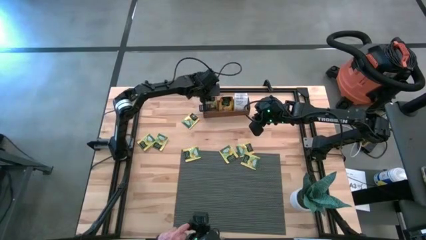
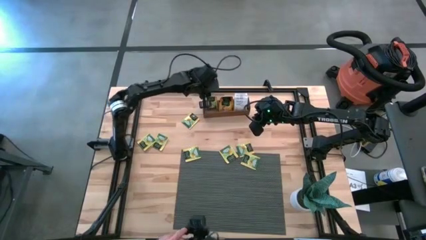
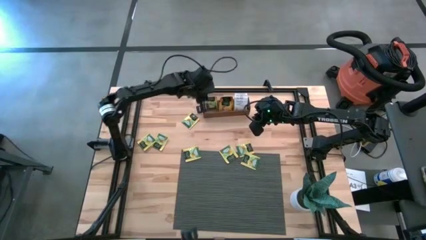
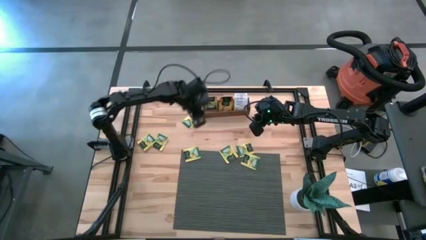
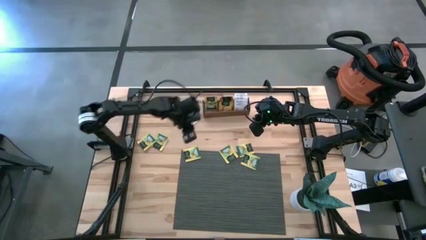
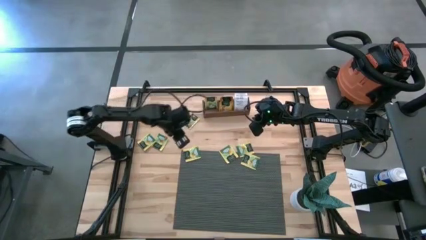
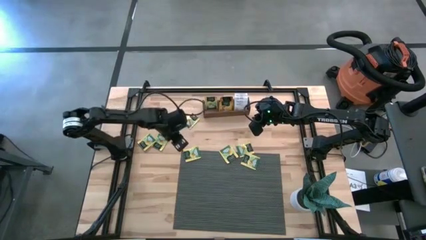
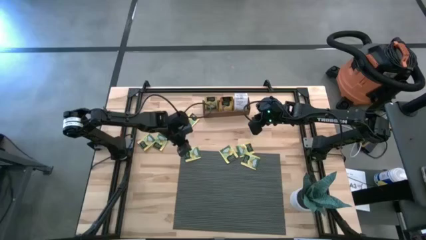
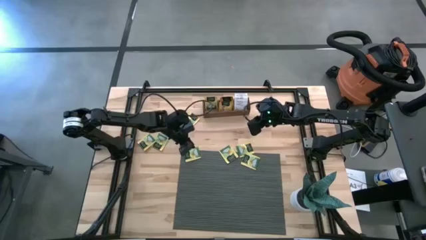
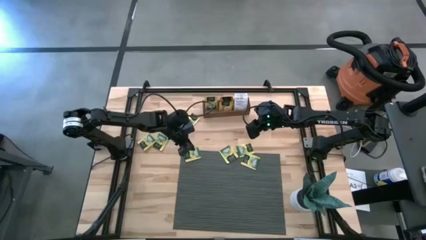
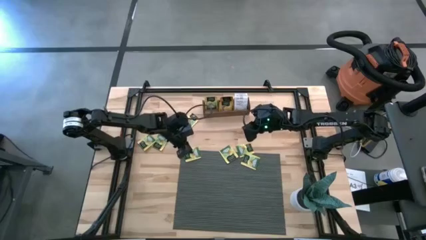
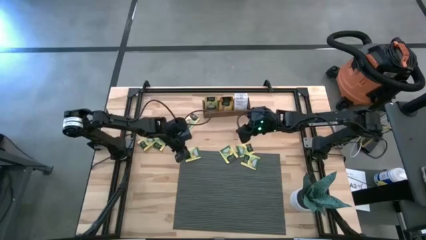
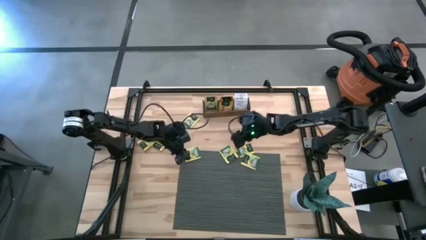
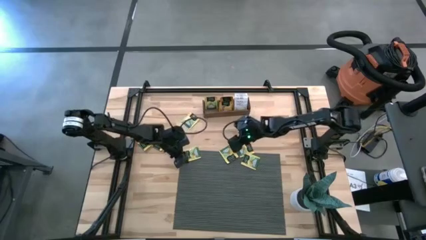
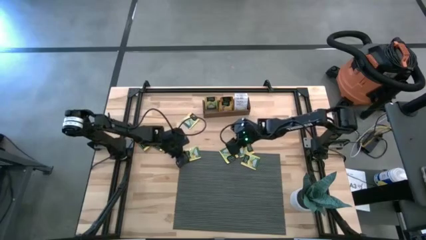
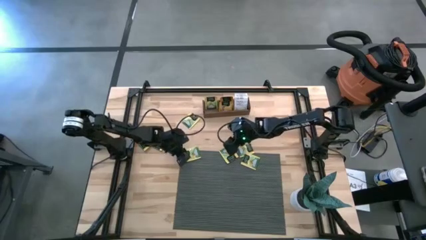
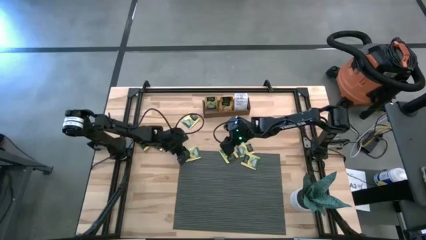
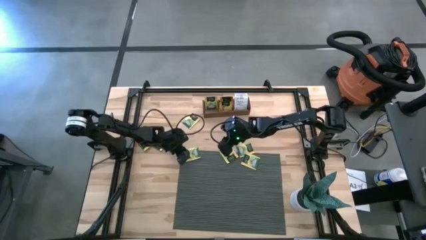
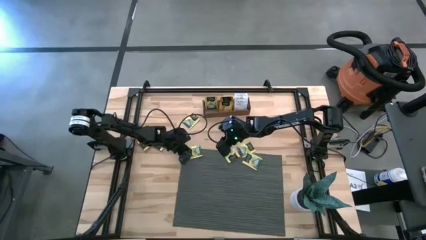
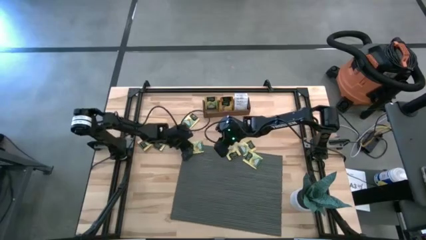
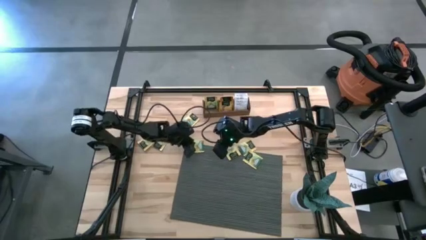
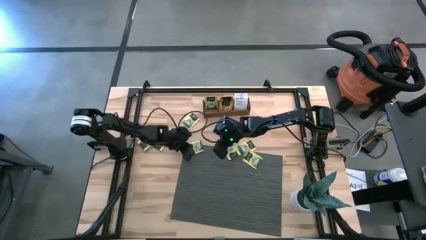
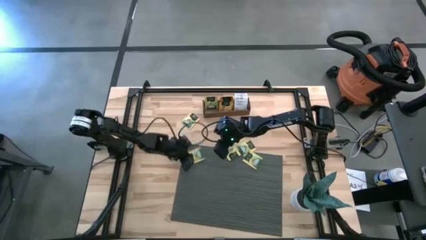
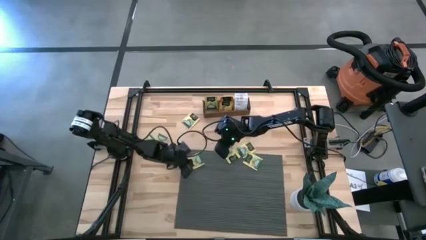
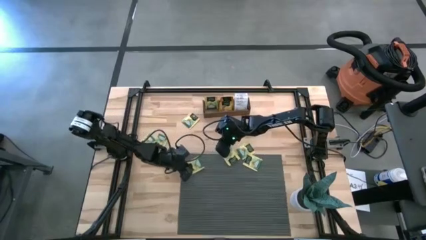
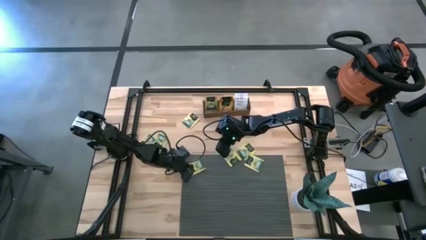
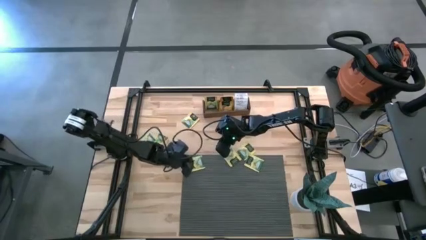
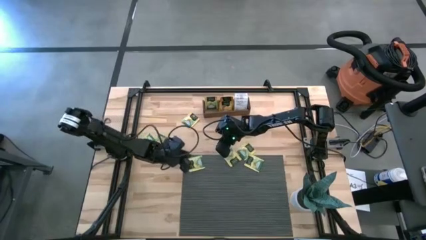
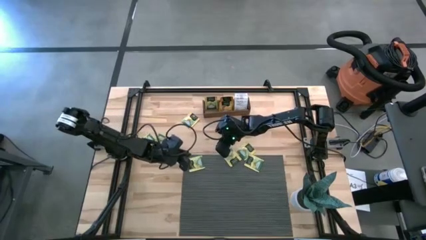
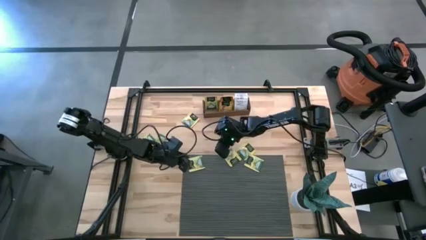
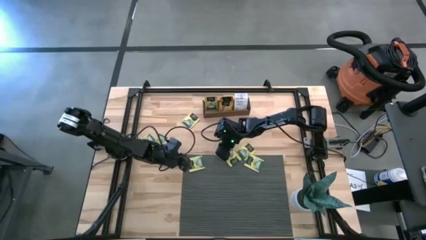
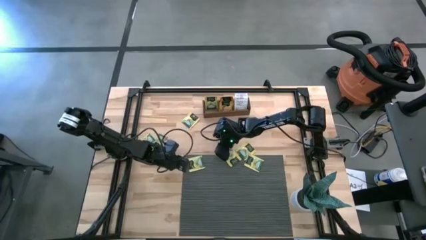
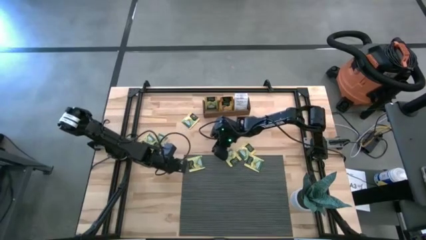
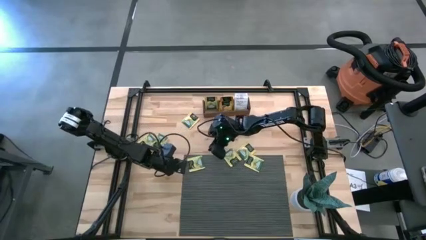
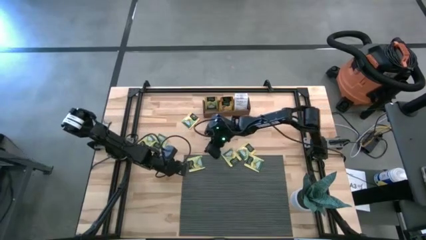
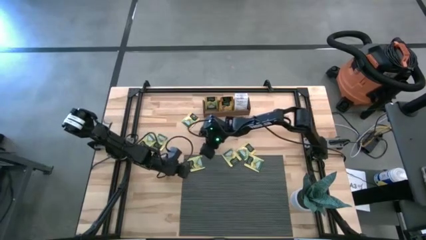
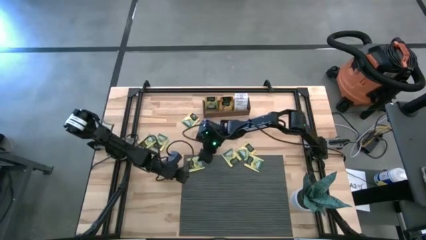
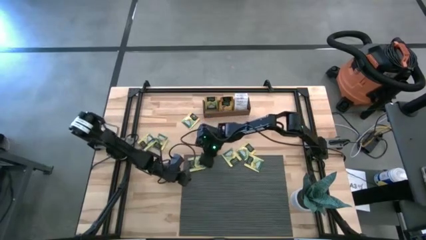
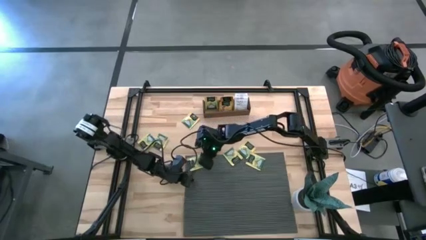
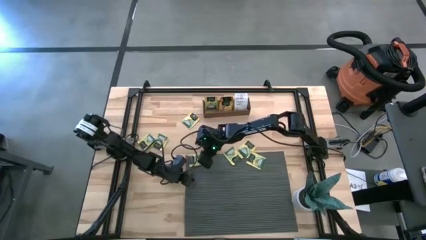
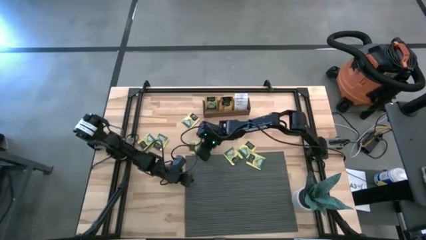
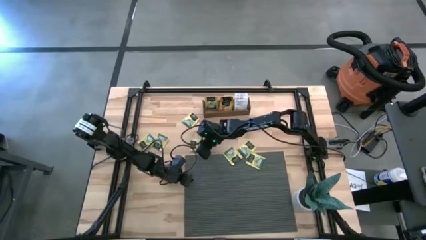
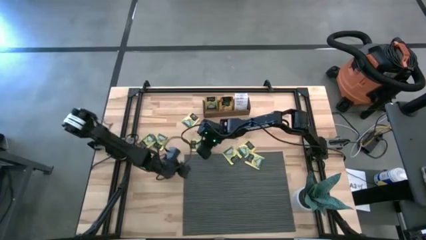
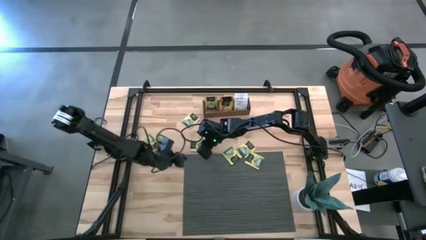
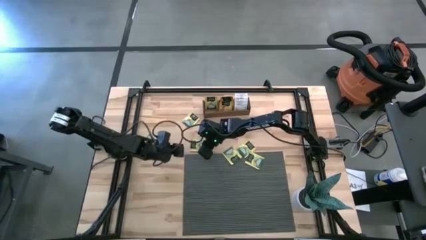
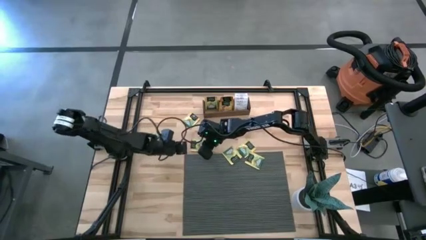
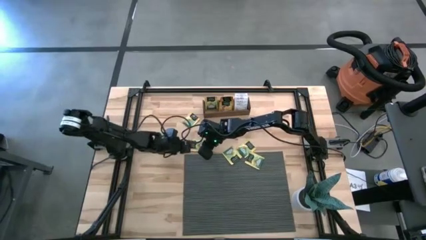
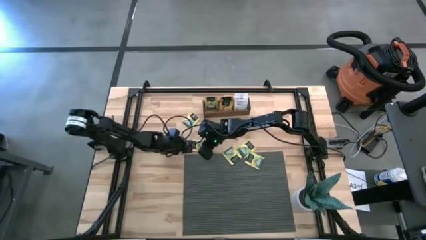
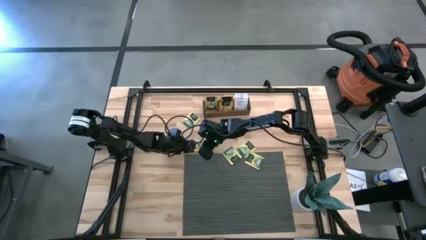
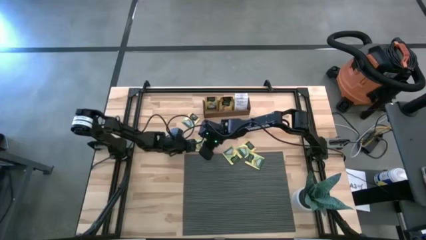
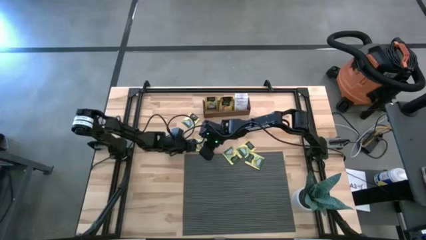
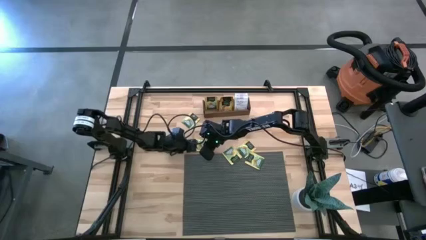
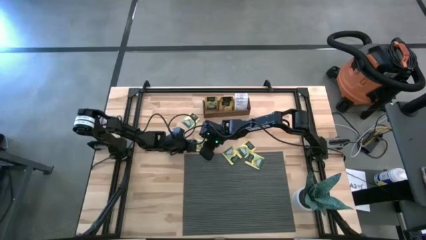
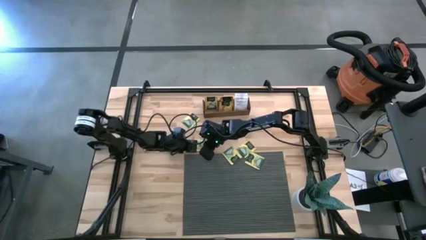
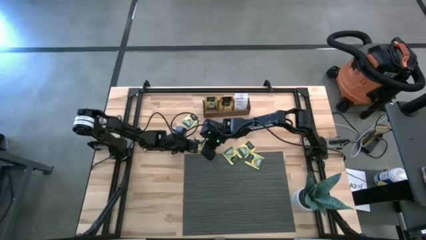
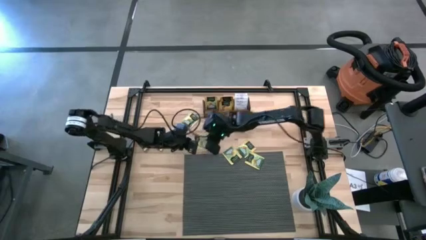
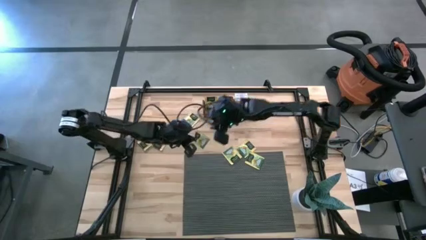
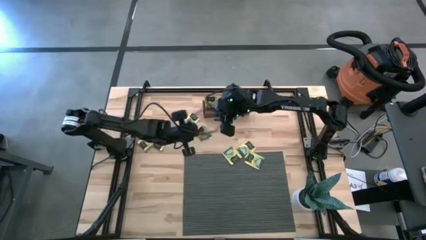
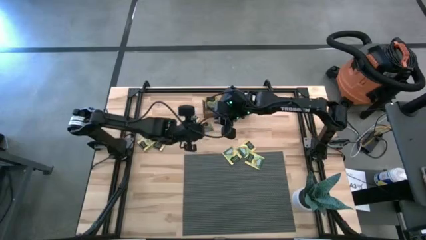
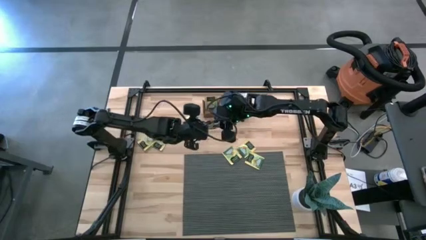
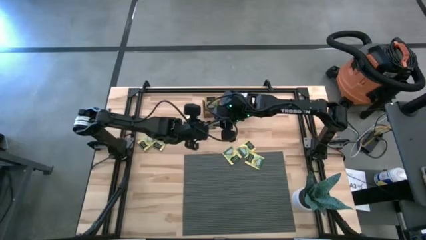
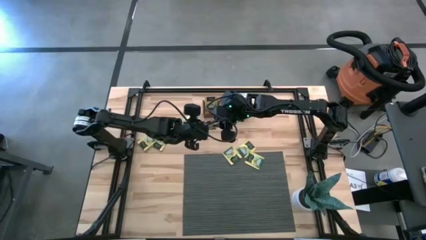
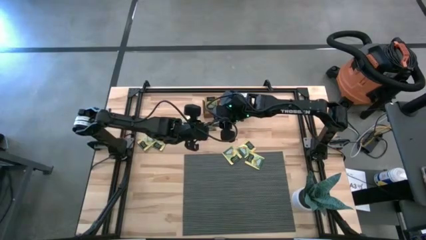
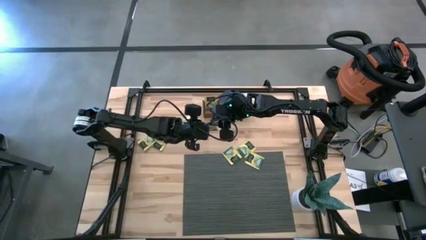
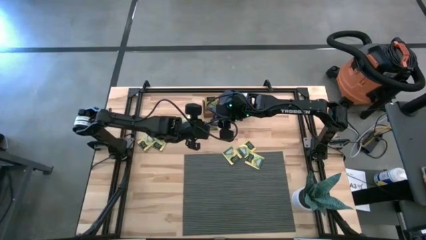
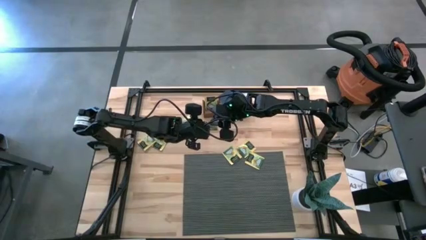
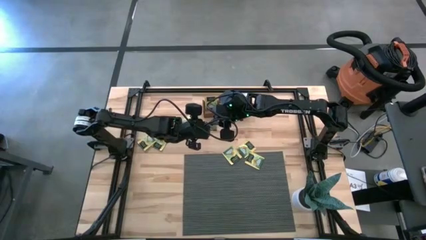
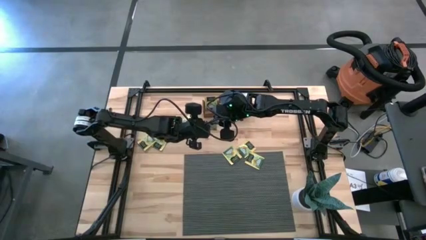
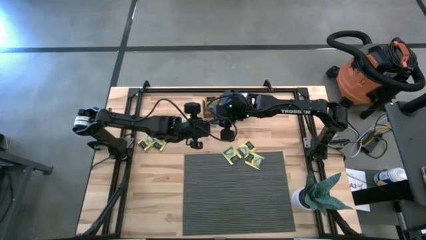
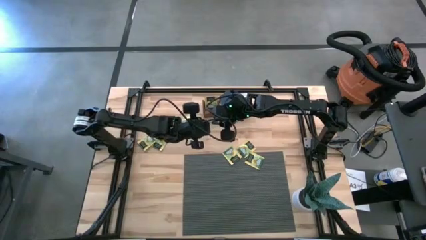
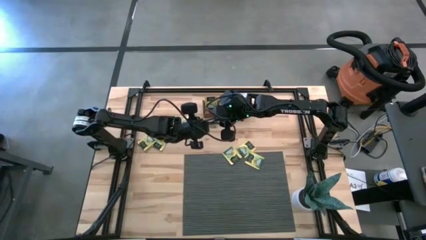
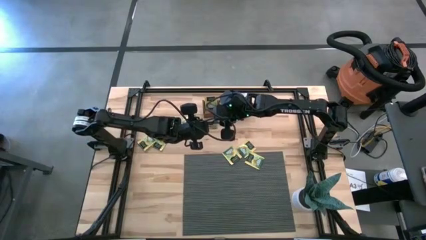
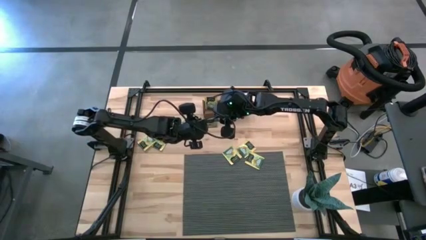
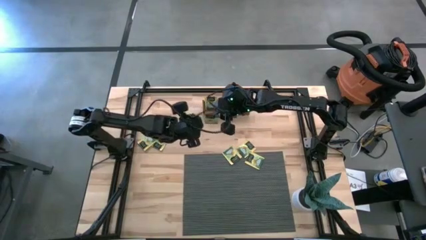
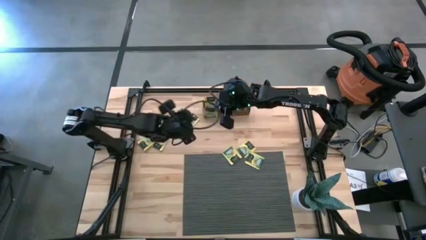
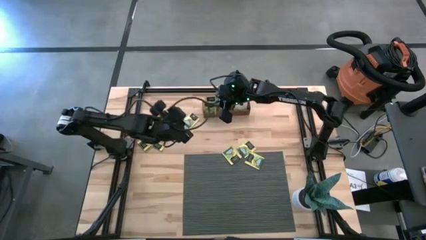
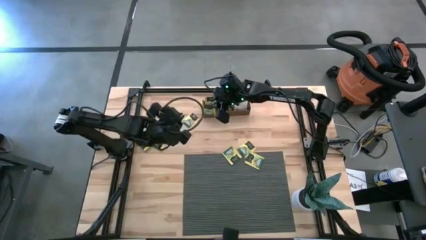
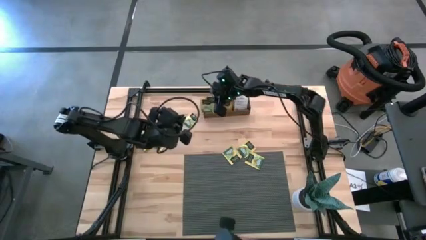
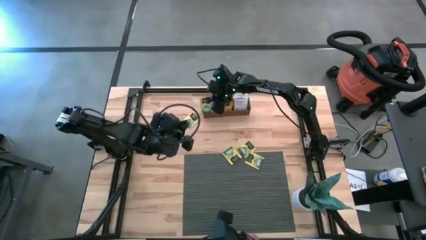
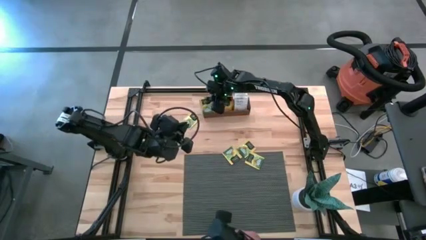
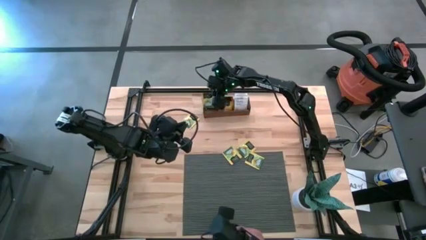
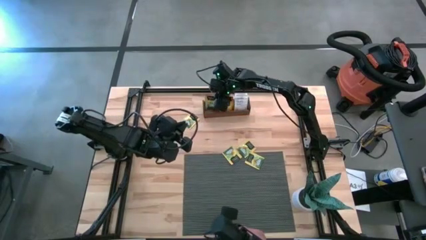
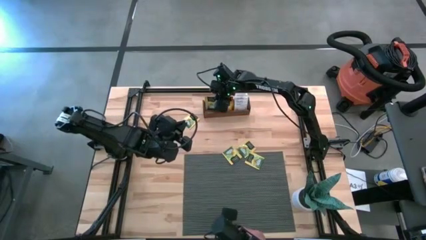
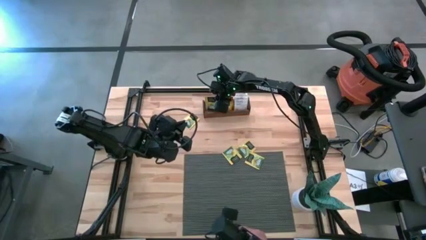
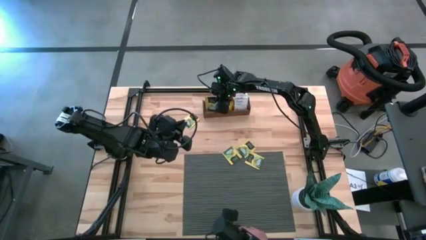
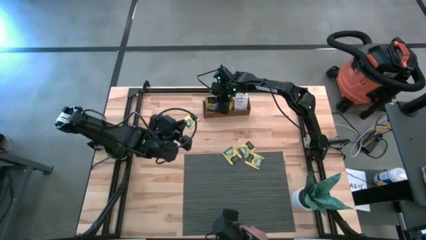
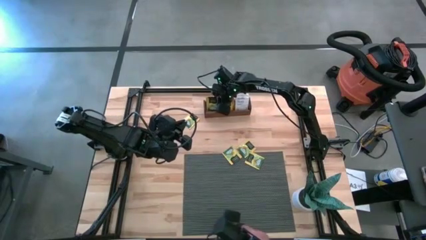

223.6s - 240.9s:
Task: Pick & Place Tea
Put the yellow tea bag into the left section of the wooden organizer
